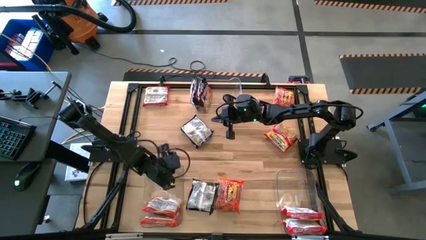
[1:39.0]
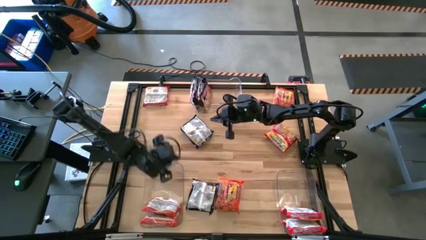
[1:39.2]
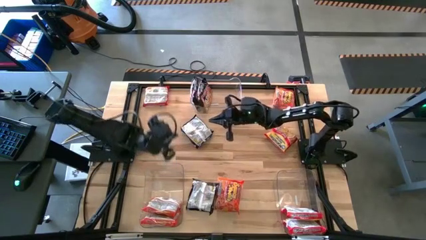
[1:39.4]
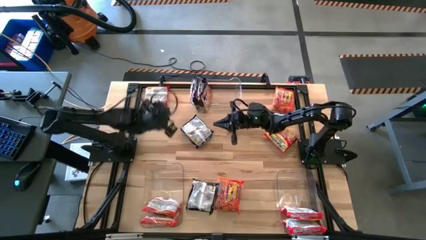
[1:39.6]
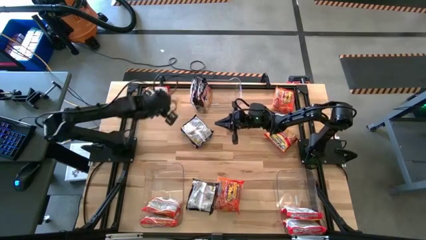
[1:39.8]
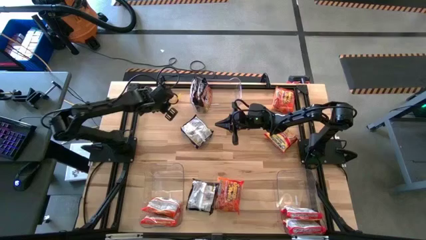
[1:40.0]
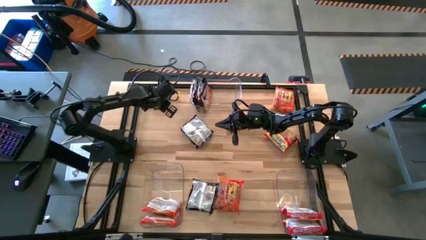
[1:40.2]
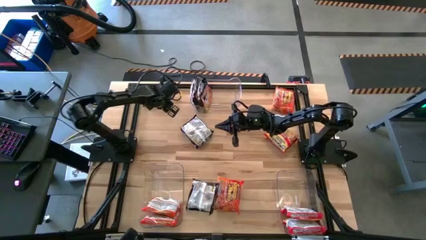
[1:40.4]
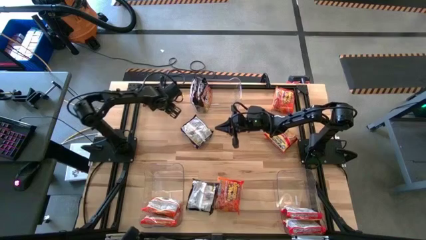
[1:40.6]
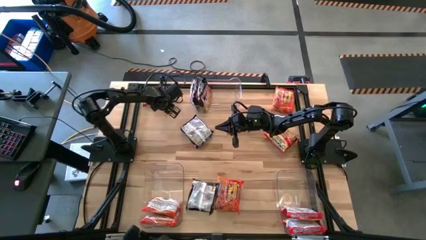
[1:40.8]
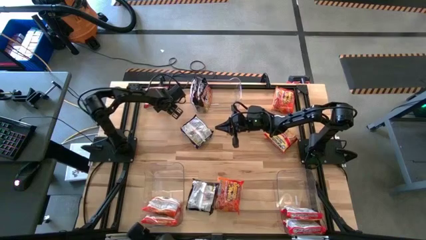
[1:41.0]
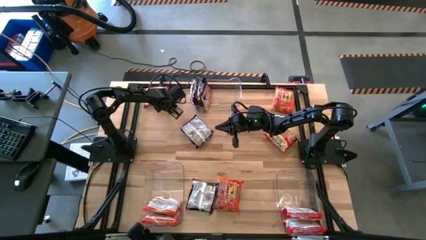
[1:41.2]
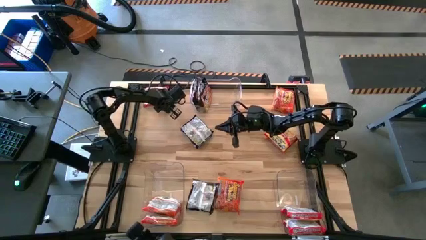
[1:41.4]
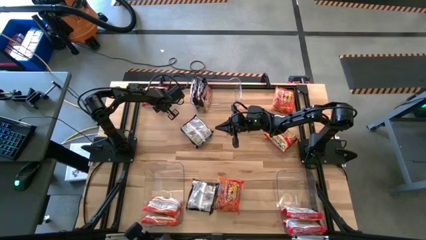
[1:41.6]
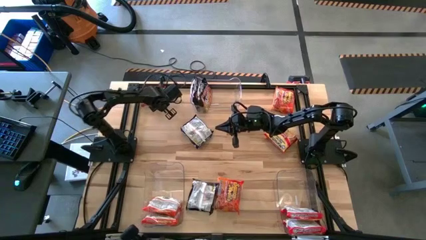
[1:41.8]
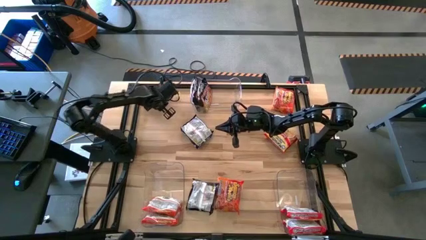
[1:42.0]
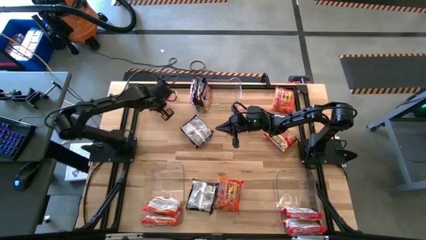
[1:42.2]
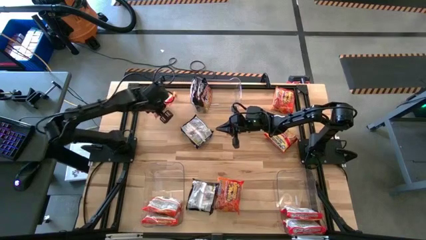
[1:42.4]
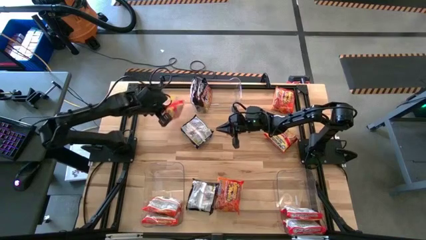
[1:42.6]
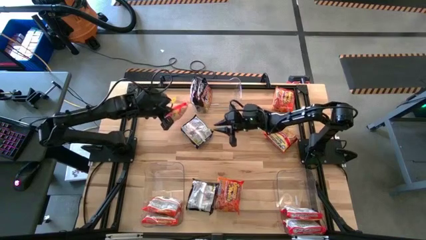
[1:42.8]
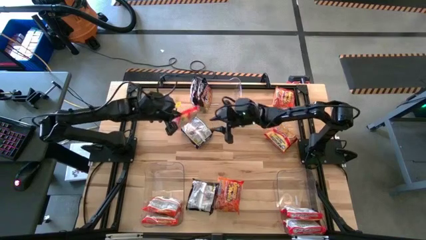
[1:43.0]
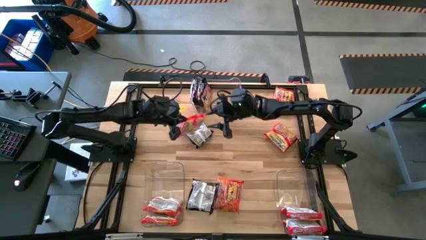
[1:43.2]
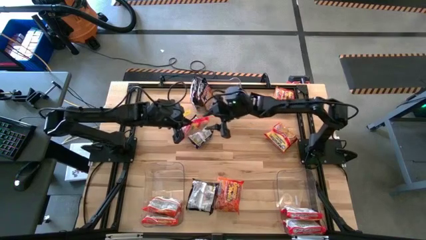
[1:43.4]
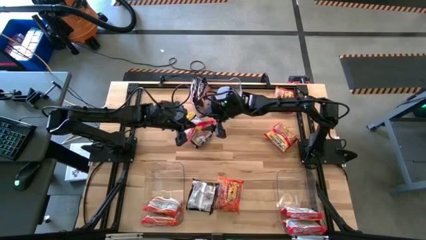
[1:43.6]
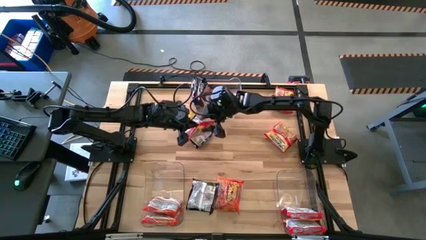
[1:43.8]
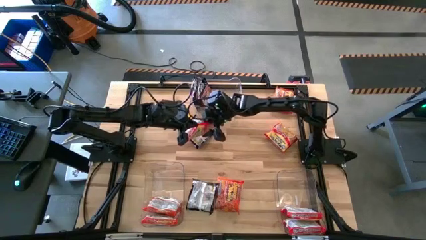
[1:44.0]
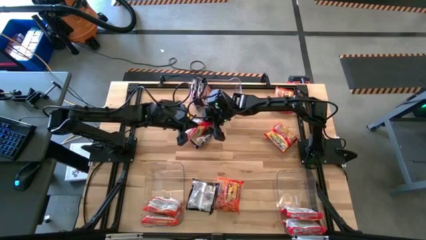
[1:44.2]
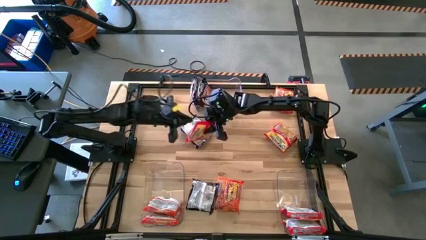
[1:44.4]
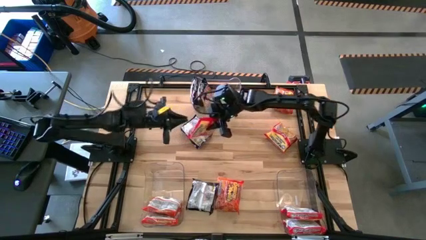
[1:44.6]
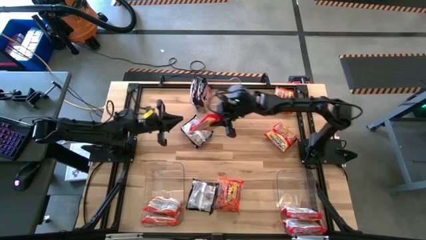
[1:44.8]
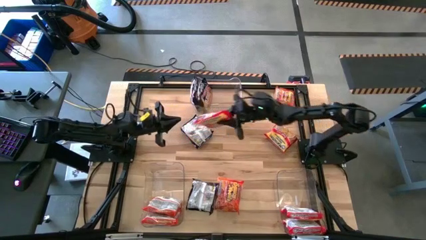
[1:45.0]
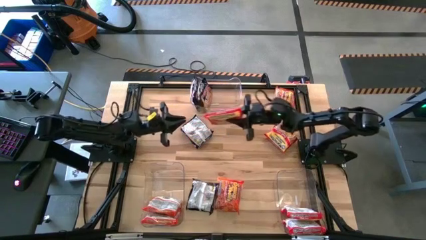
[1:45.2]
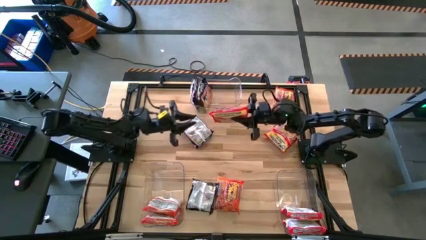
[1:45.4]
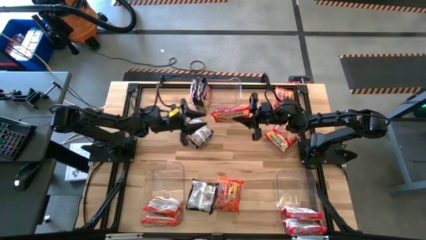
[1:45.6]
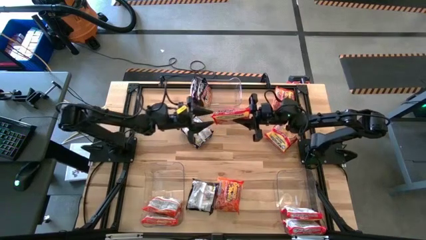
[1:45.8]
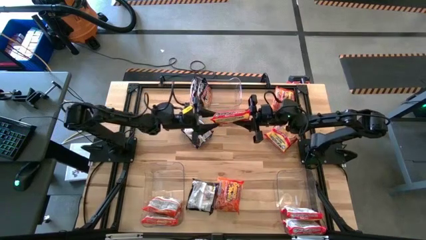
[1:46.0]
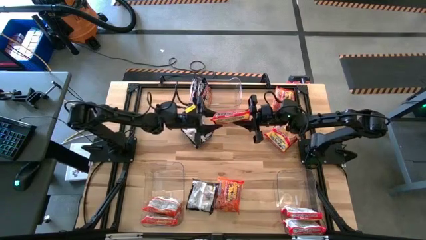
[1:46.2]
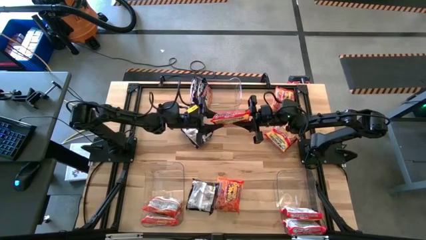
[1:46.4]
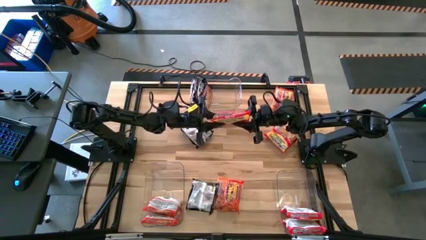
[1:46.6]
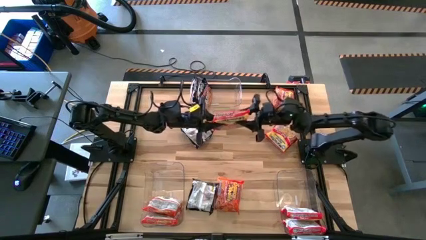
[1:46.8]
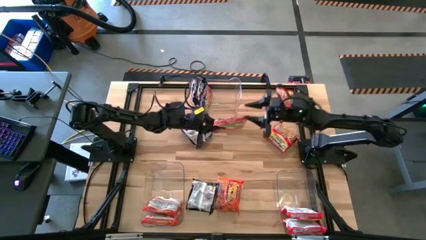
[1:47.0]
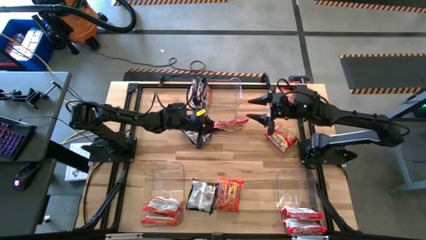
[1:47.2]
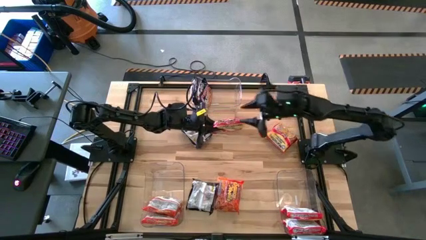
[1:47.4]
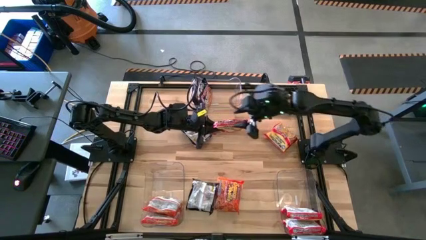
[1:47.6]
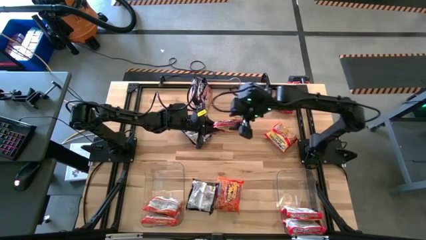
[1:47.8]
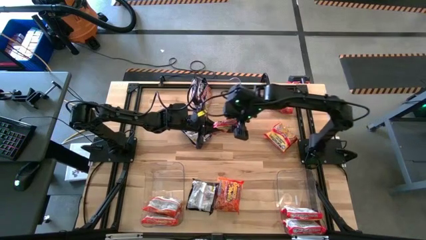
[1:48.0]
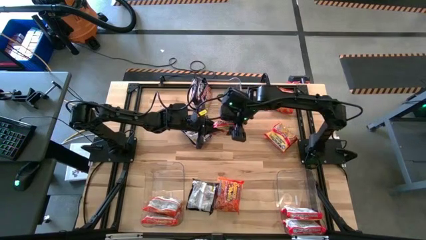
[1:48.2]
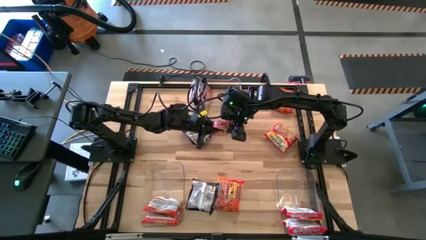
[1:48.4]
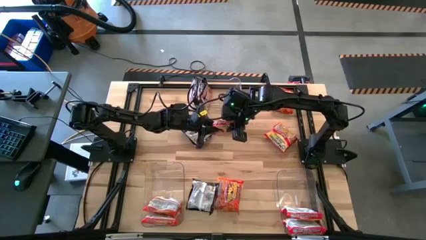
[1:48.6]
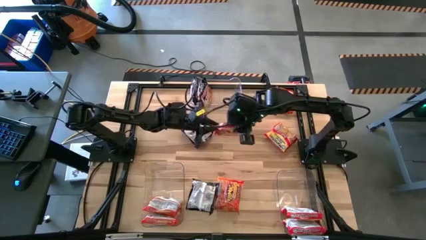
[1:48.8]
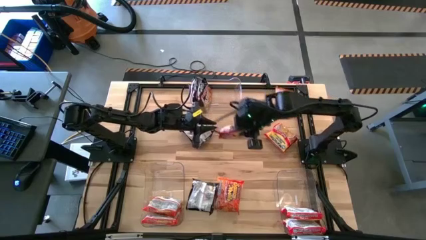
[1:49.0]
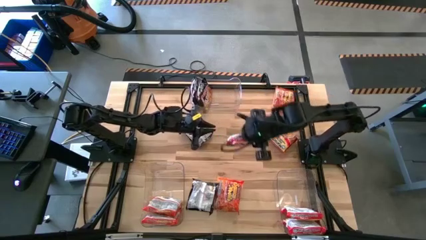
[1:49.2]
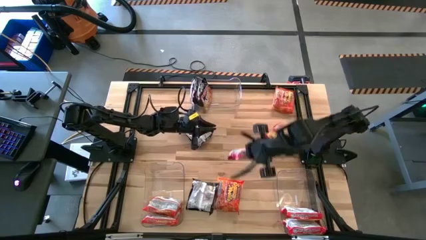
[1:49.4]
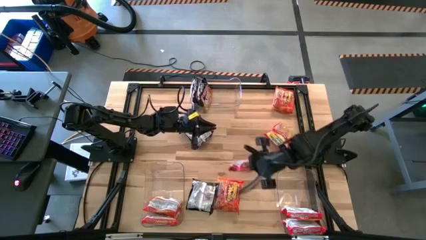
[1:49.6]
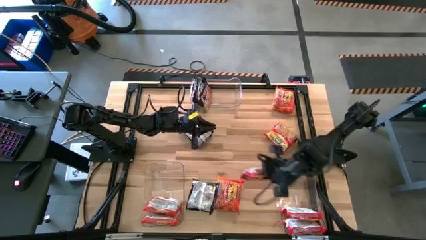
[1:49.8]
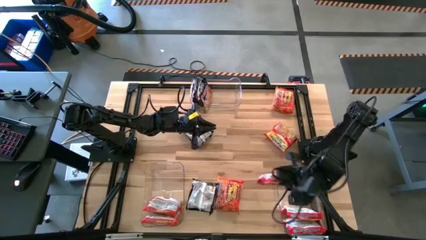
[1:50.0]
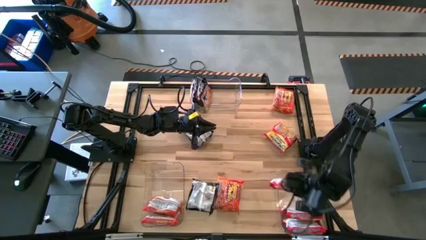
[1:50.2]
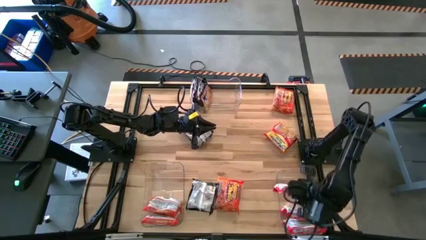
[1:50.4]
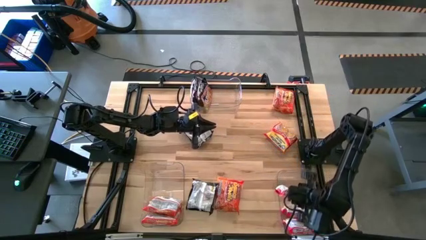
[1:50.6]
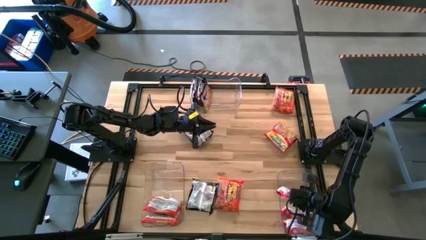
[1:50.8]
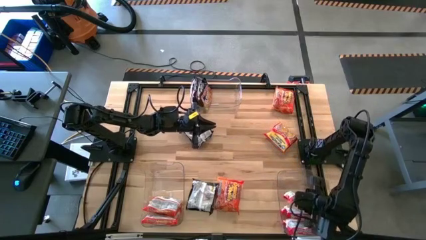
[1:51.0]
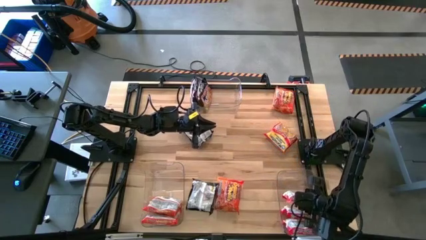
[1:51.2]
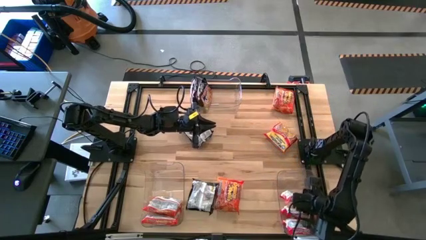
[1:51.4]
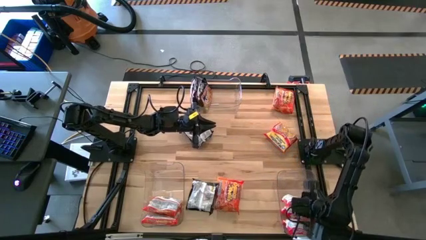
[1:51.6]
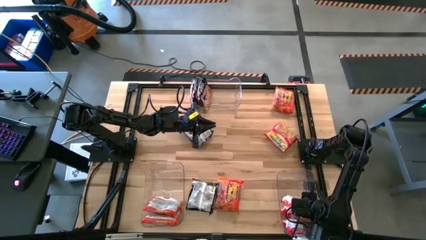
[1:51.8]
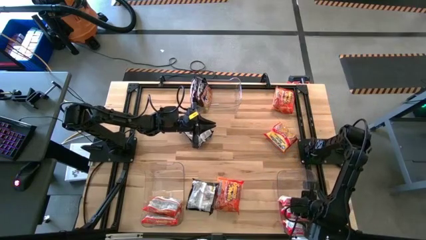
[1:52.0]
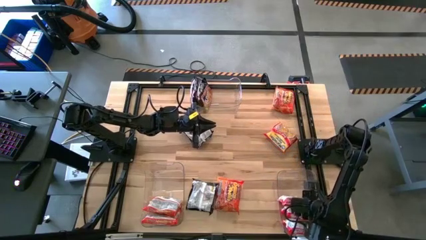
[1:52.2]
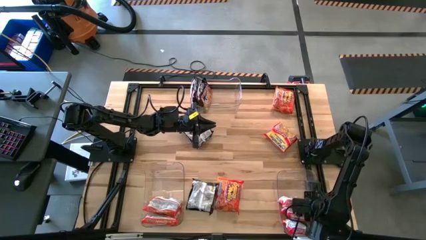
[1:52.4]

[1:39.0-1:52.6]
Task: Sort Maruchan noodles
Put the left red noodle pack into the bottom right transparent bin
